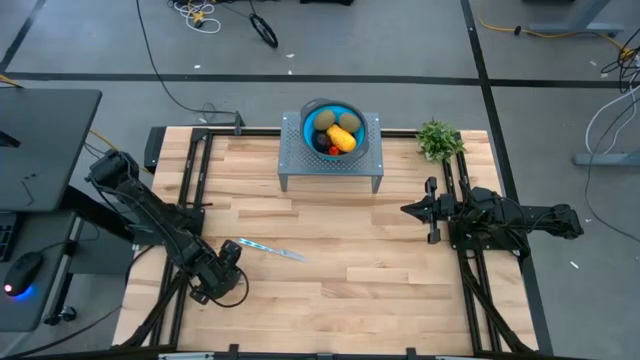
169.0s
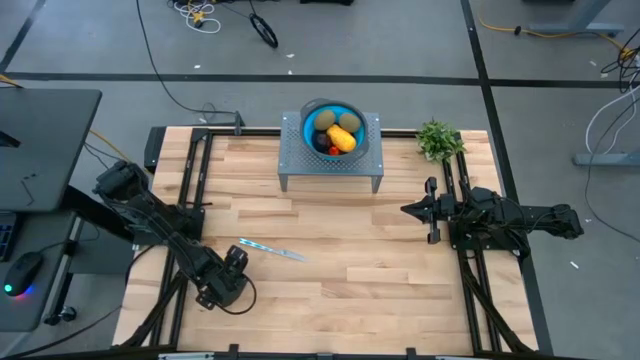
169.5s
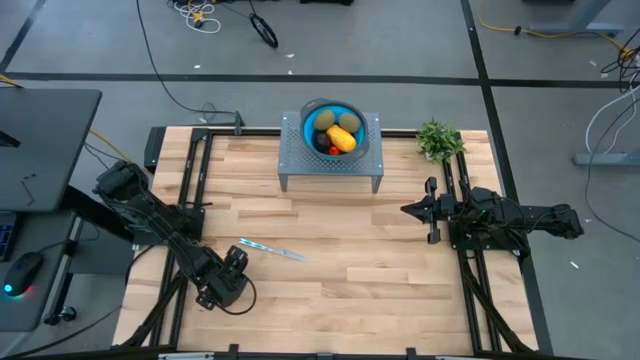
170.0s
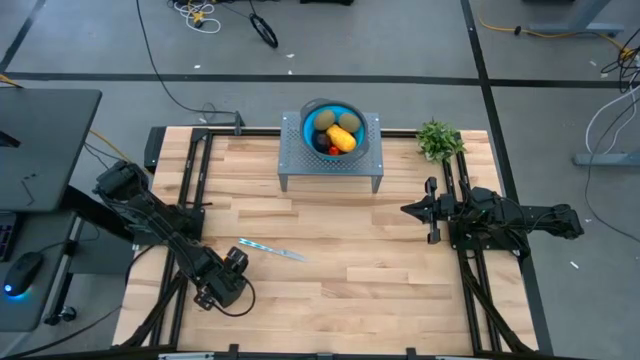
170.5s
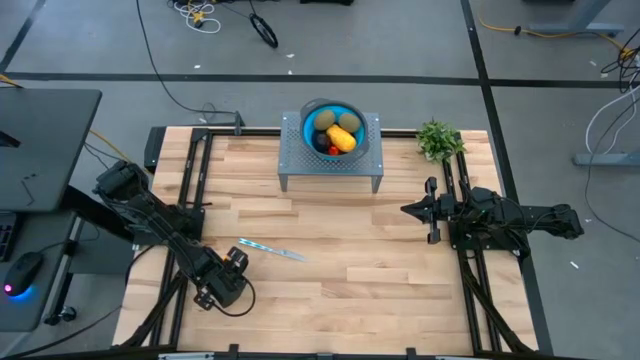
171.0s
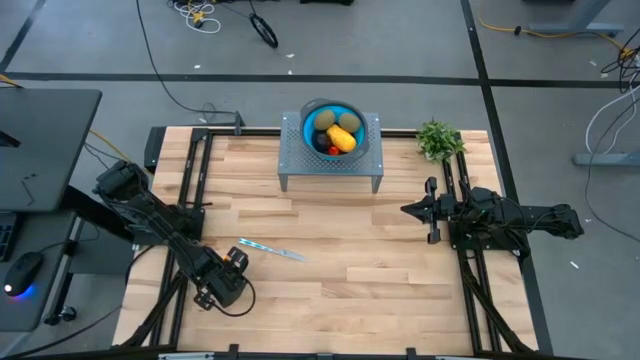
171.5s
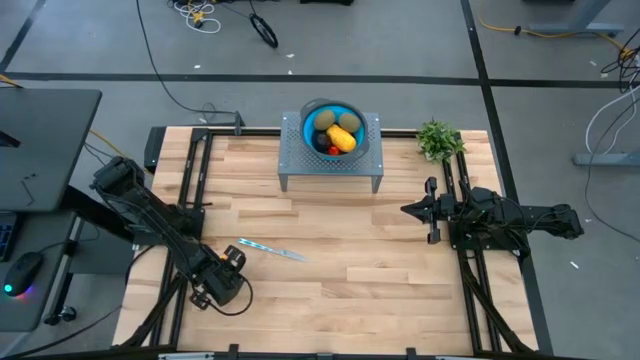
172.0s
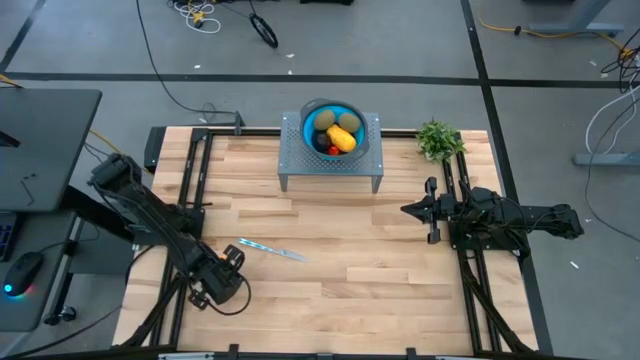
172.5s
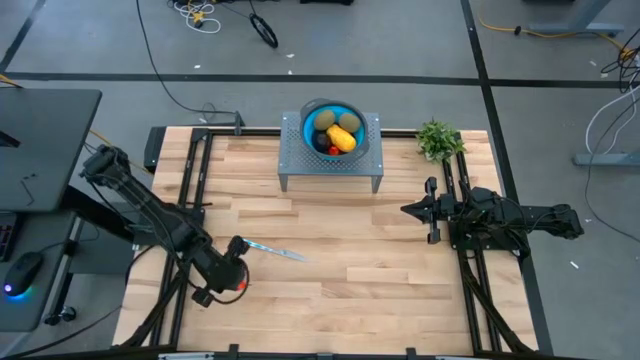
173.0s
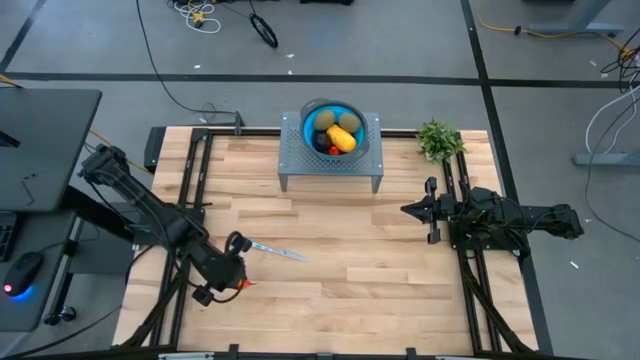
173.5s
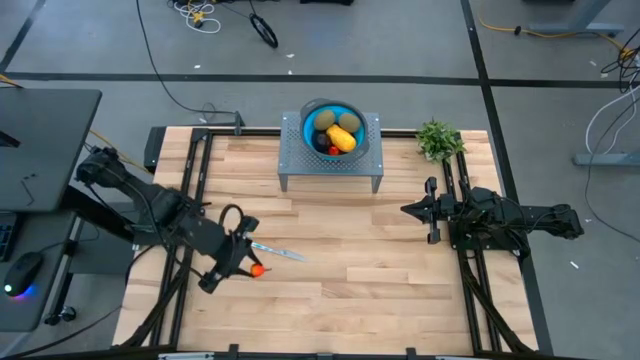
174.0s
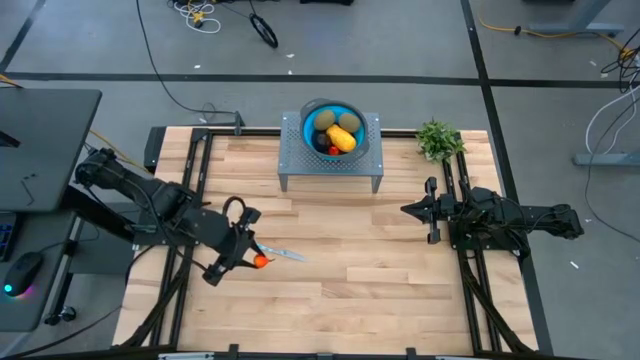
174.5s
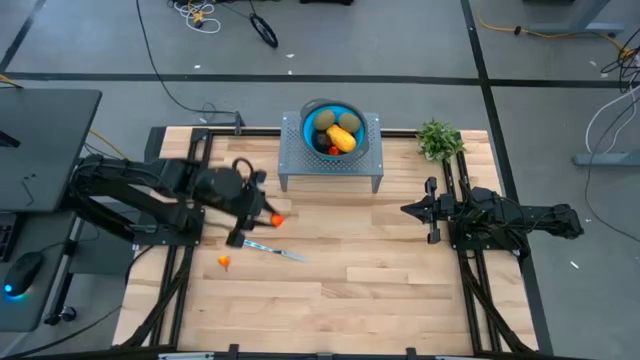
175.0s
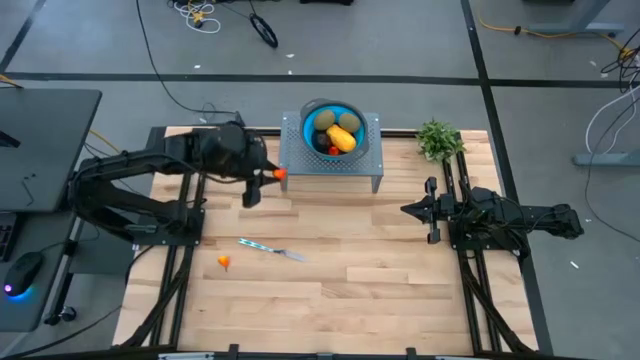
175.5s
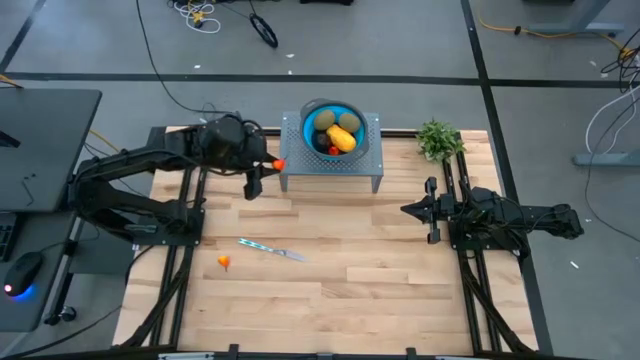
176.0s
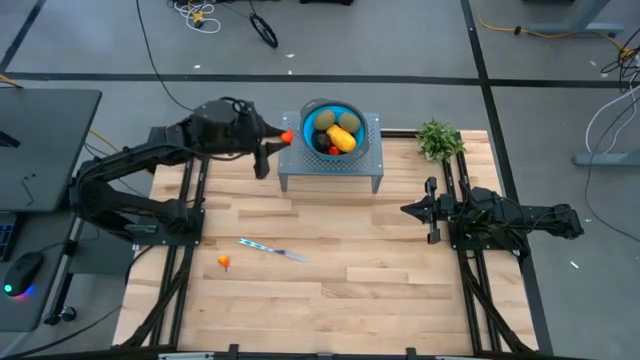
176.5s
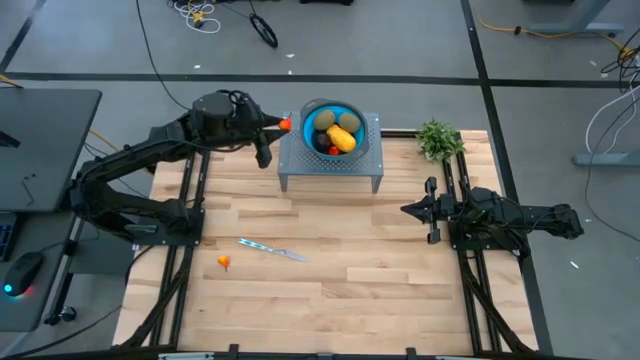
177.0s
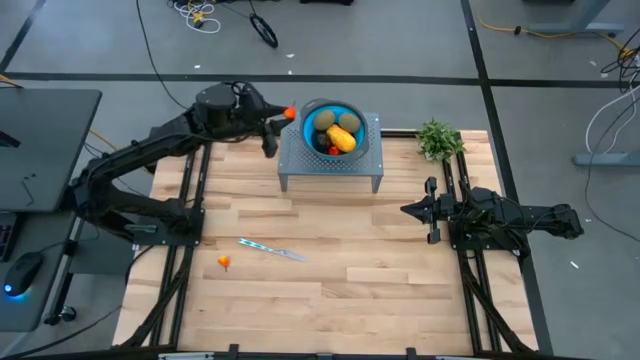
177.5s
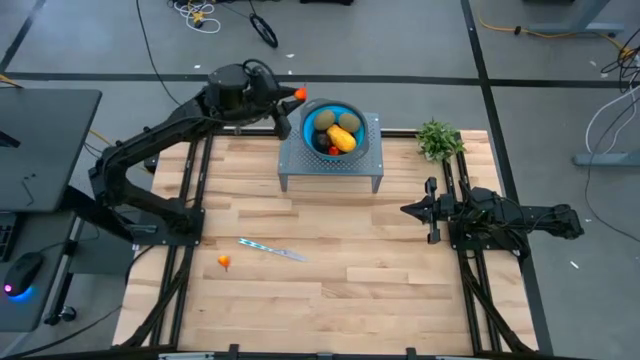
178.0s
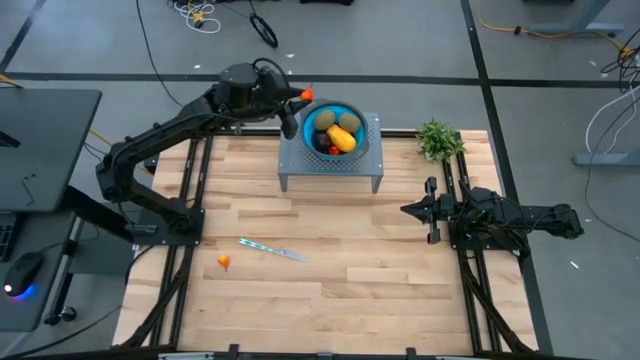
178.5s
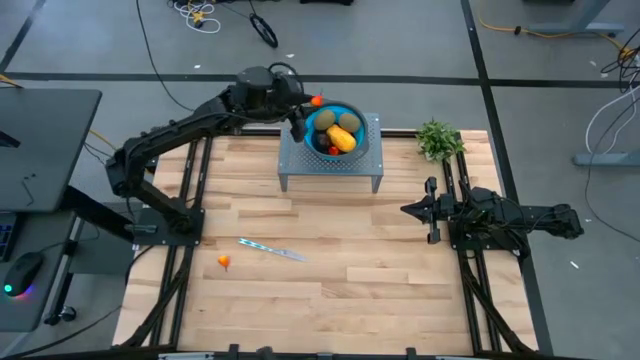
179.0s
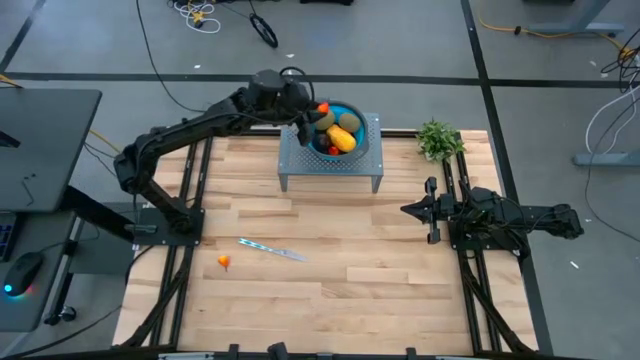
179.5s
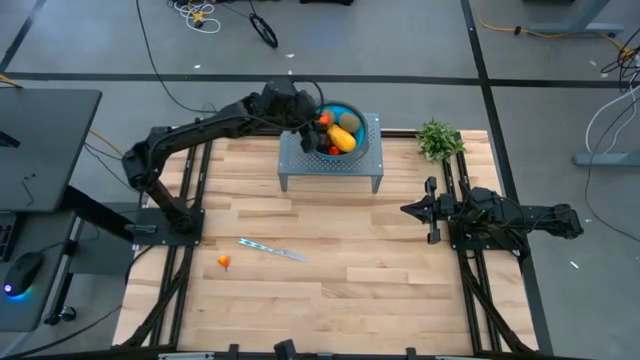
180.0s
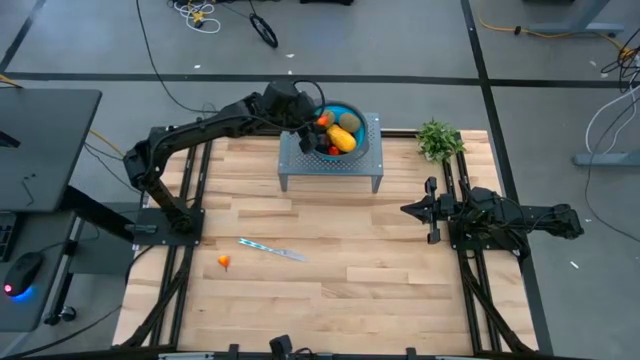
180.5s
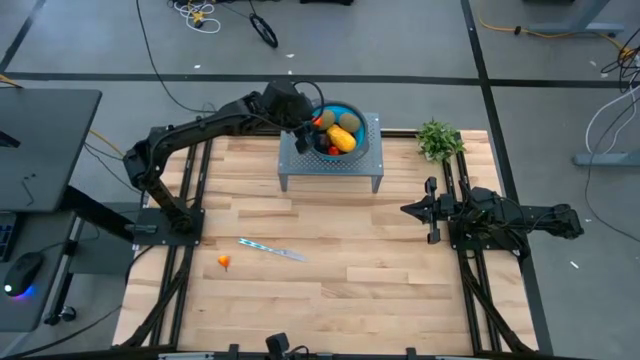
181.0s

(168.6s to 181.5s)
Task: Pick & Place Fruit
Put the peach into the blue bin
